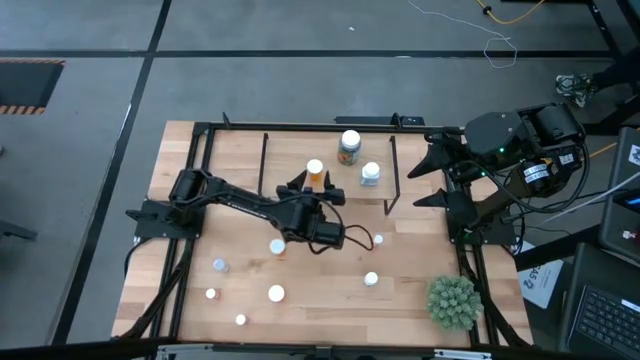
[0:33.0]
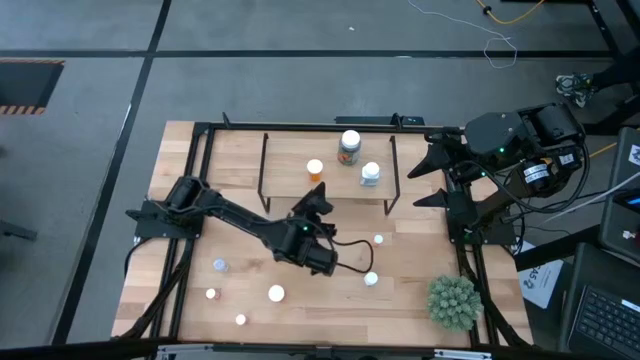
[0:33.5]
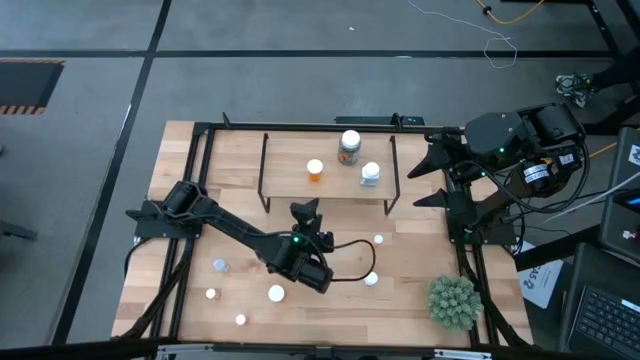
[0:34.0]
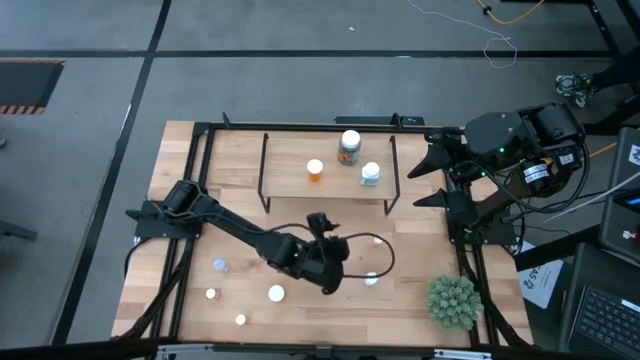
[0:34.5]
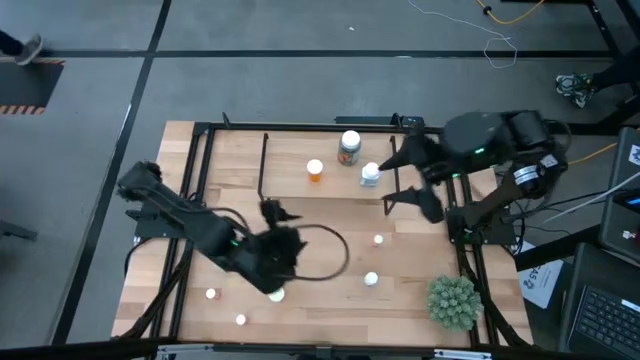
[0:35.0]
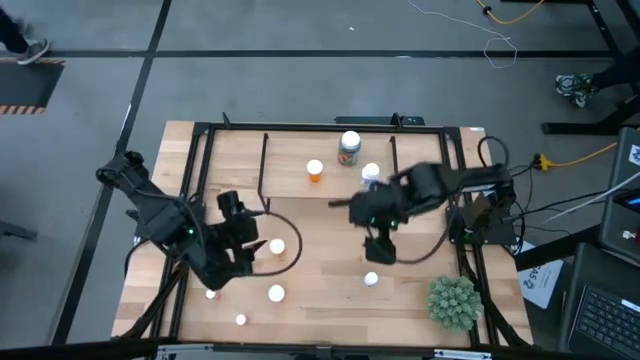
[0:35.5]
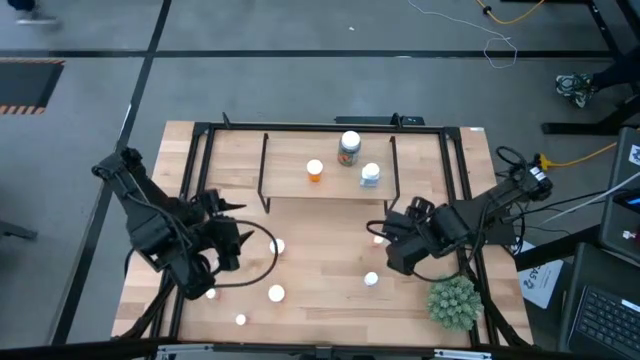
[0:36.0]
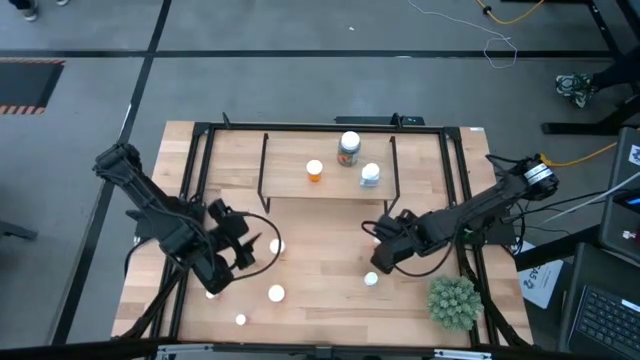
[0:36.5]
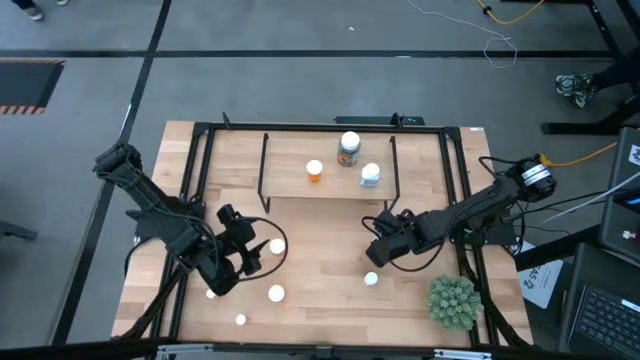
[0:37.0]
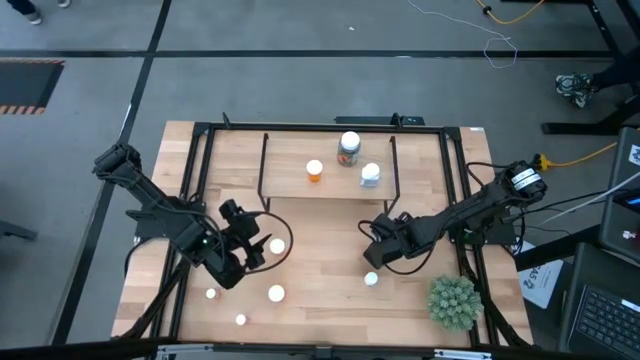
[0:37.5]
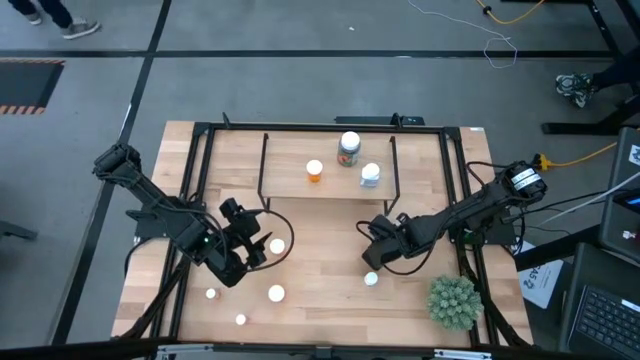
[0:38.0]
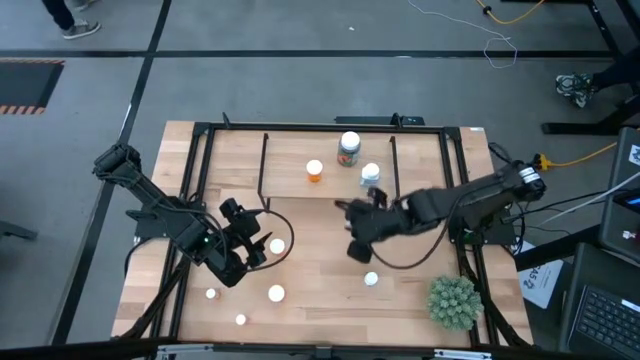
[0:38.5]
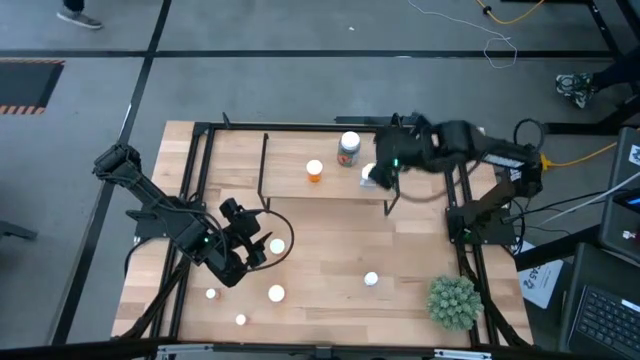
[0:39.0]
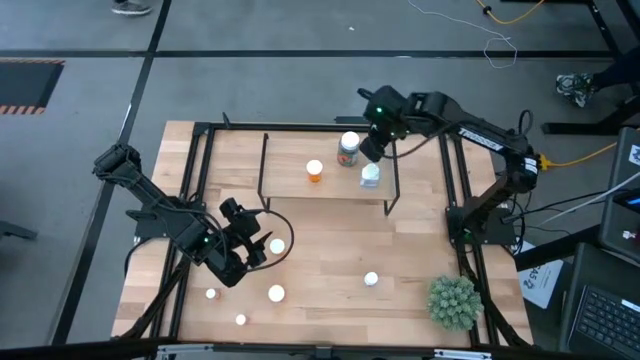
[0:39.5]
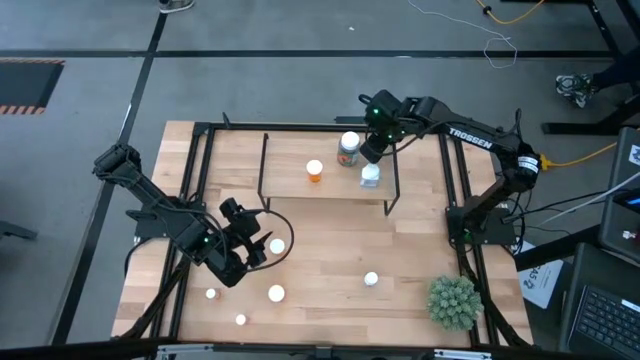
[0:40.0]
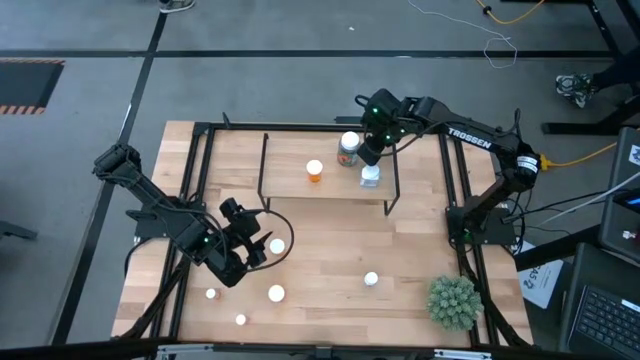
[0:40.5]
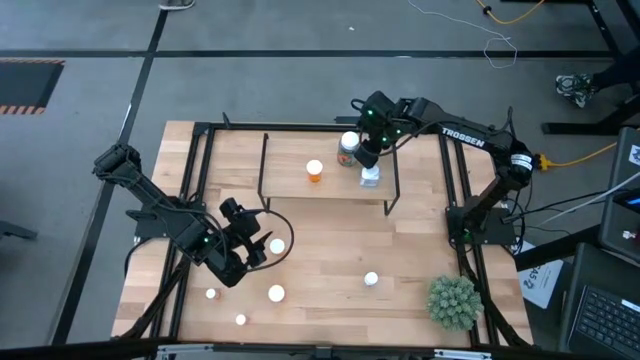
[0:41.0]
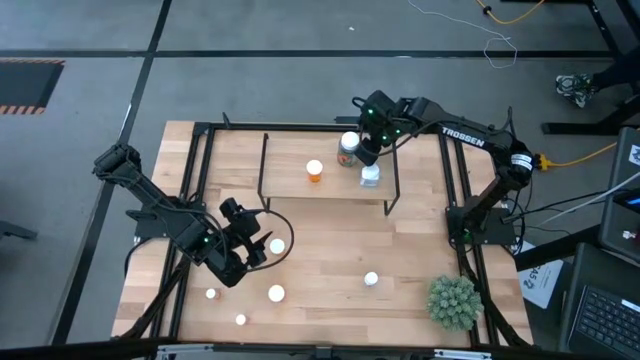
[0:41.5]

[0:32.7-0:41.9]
Task: Pick and place medicine bottles onto shelf by color
Put the top pink pill bottle on the shelf

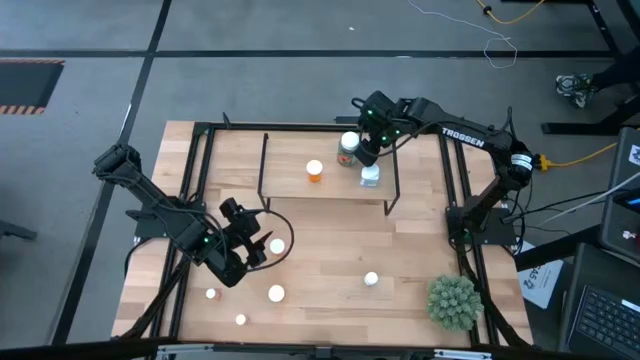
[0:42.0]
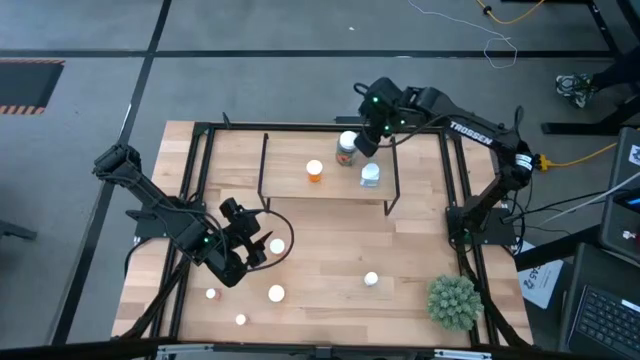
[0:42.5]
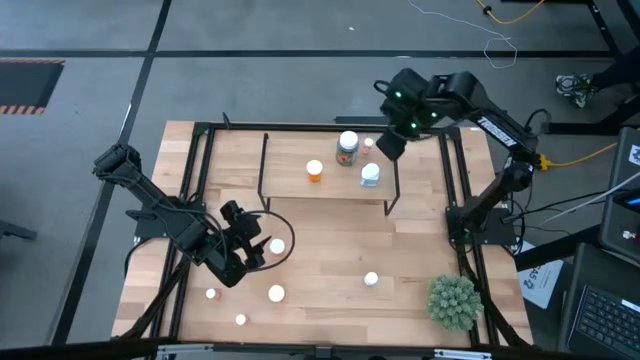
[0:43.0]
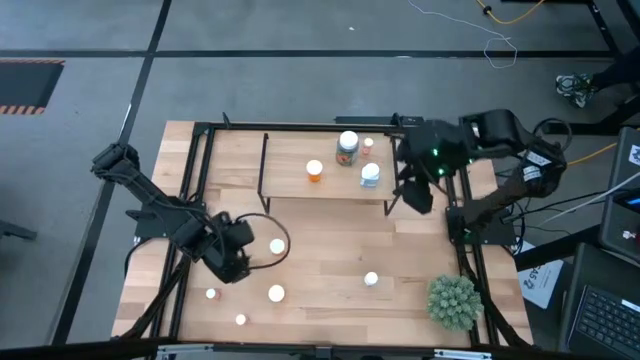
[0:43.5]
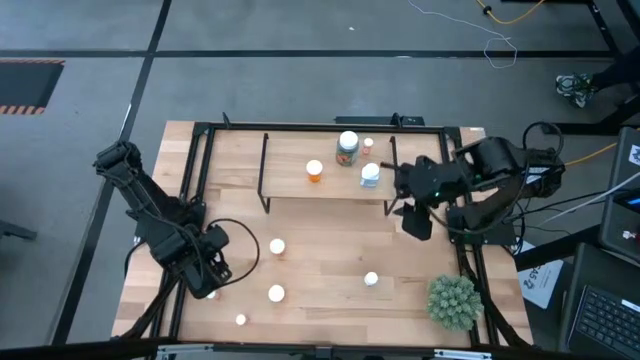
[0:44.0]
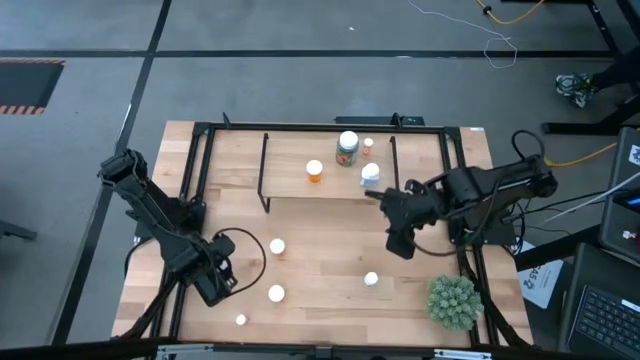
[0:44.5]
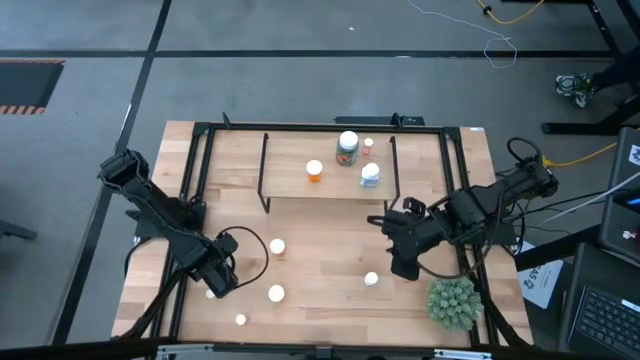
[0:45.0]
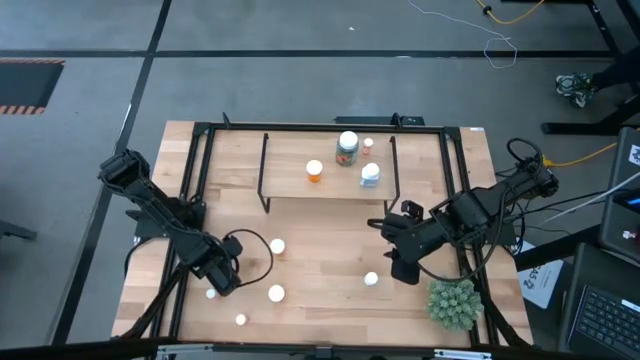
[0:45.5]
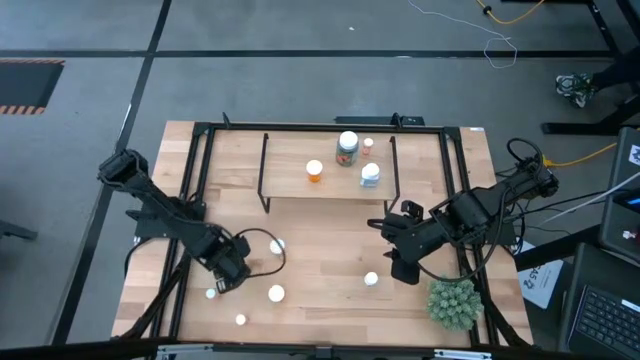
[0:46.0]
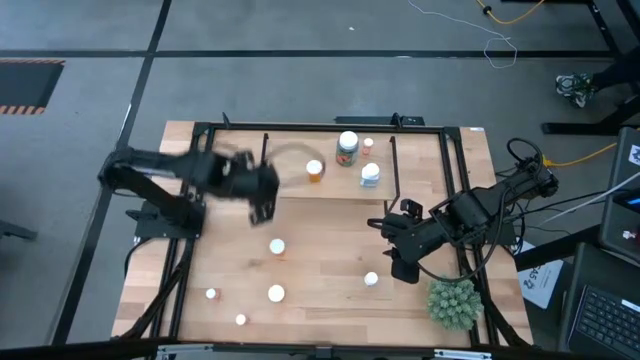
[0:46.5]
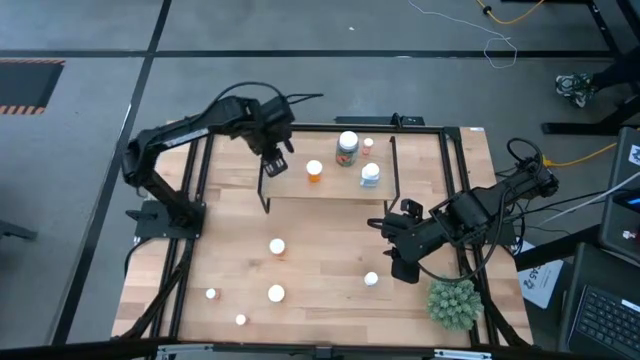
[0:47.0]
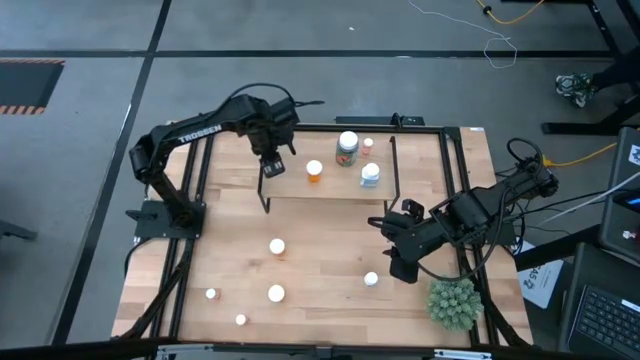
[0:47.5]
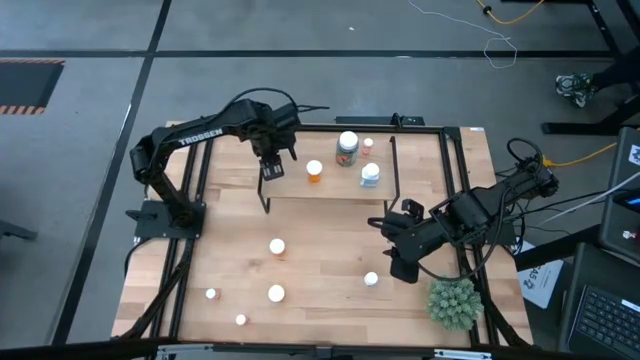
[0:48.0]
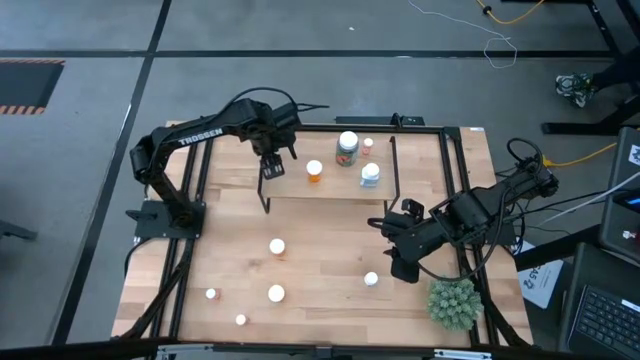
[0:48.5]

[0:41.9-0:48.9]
Put the transparent pill bottle on the shelf

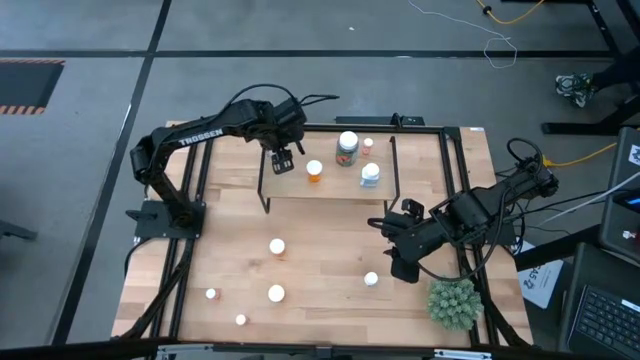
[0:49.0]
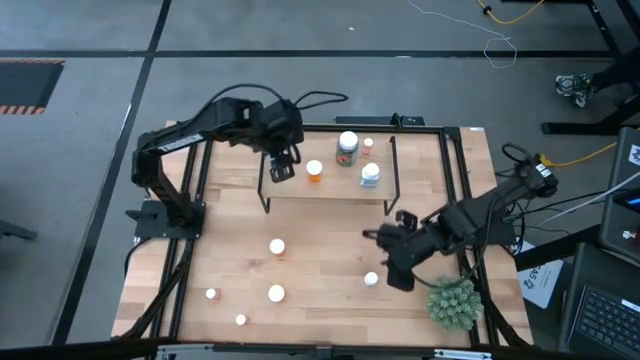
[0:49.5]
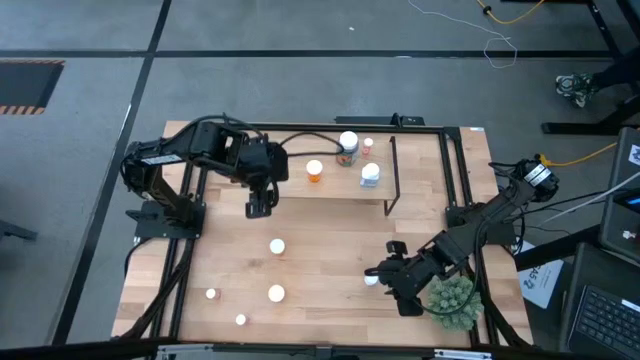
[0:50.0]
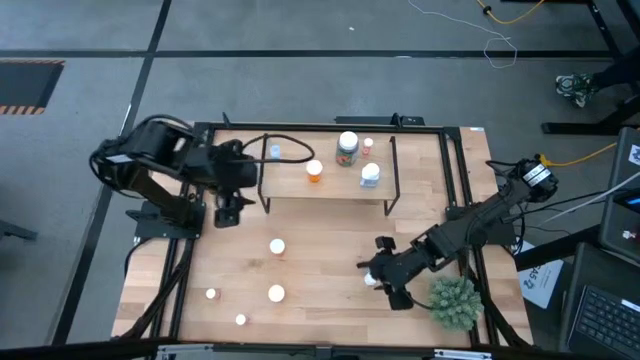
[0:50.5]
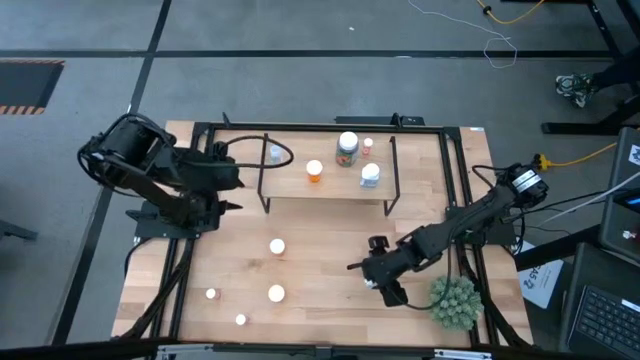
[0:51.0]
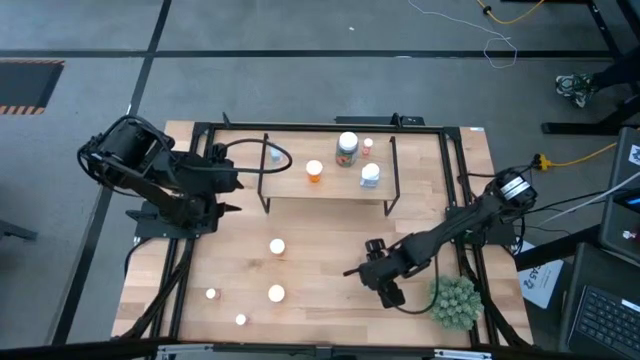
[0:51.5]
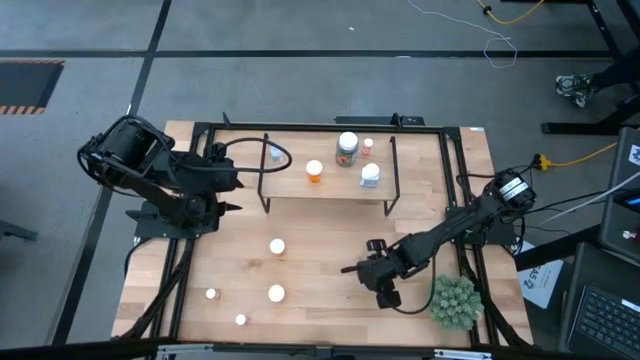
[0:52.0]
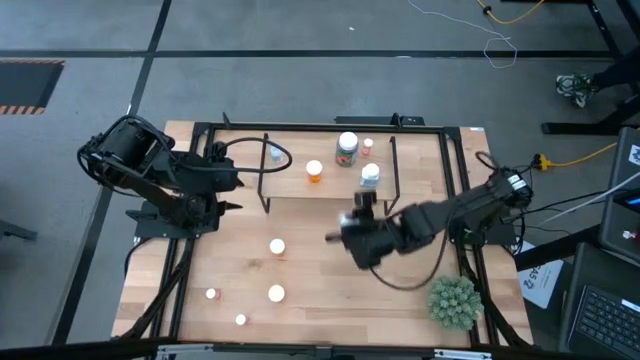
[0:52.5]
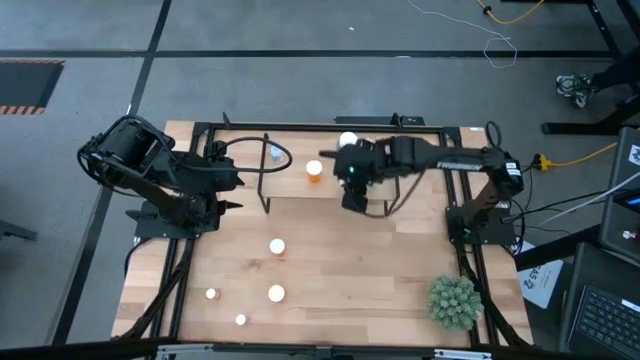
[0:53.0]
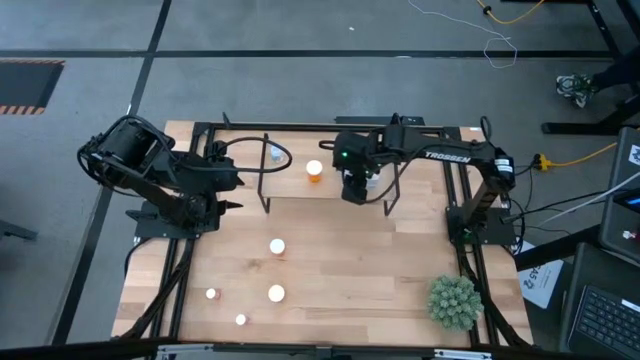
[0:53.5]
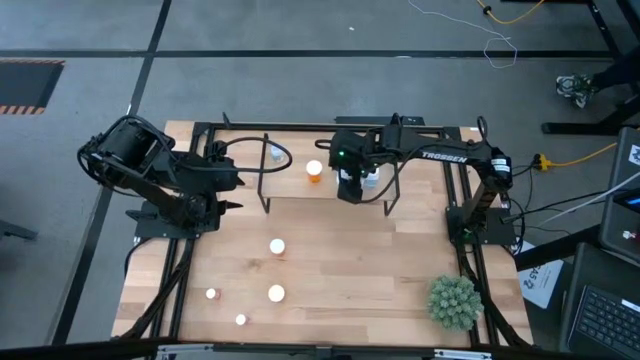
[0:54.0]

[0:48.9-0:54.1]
Put the white pill bottle on the shelf

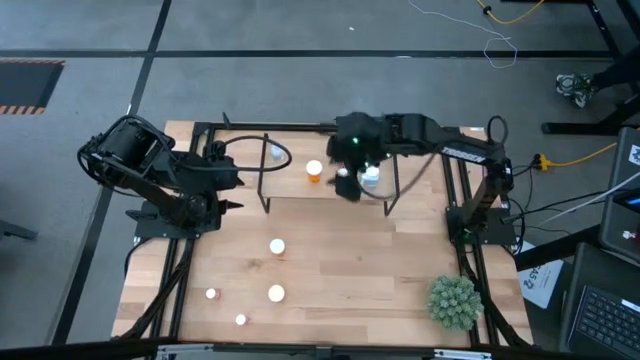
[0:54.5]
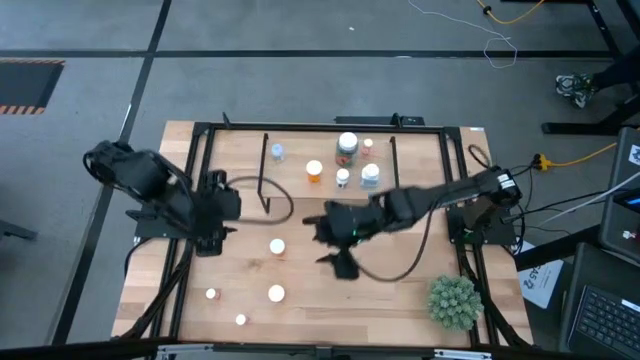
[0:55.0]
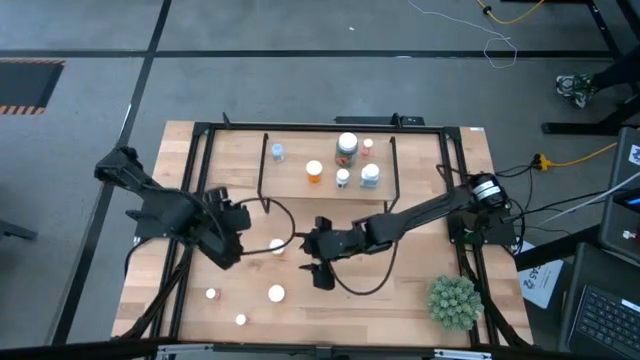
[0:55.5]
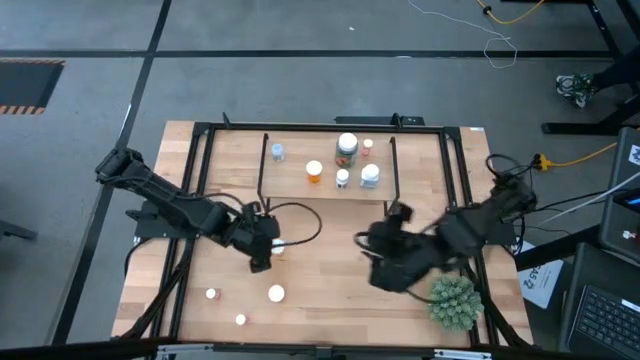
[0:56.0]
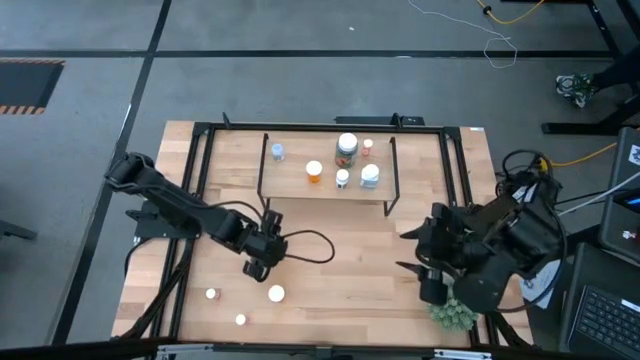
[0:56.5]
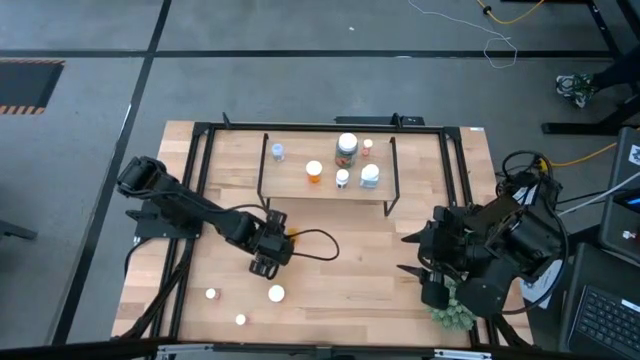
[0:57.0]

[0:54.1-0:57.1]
Put the top orange pill bottle on the shelf
